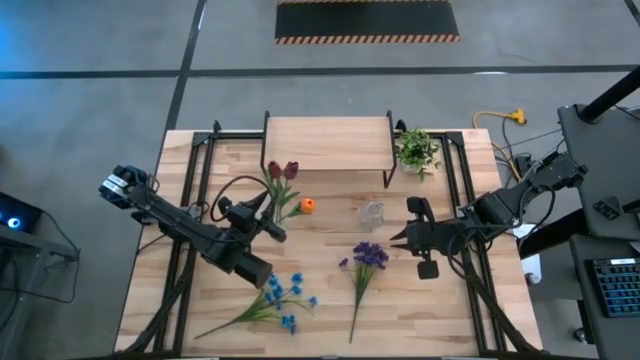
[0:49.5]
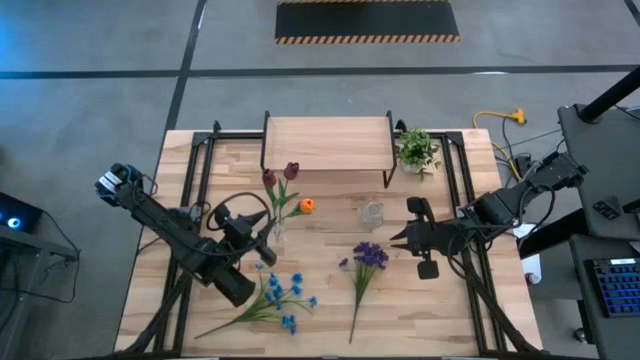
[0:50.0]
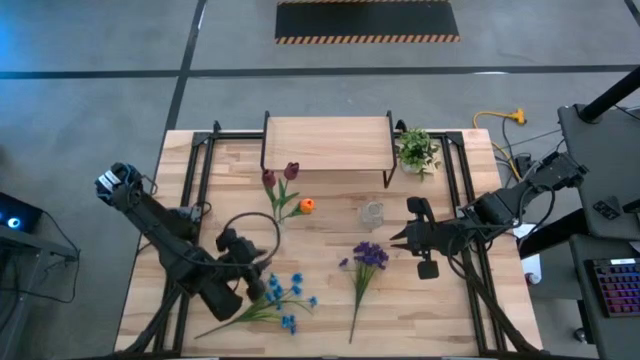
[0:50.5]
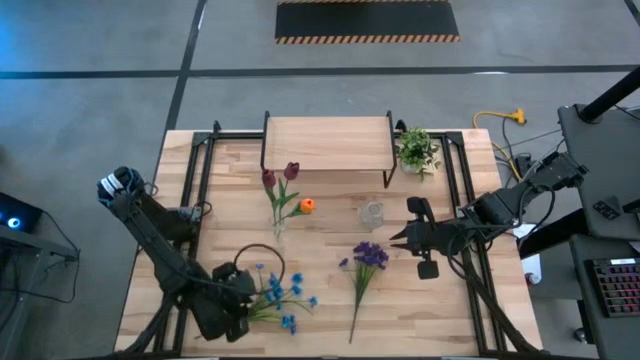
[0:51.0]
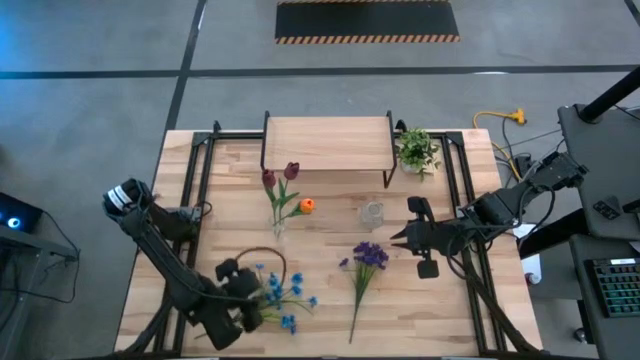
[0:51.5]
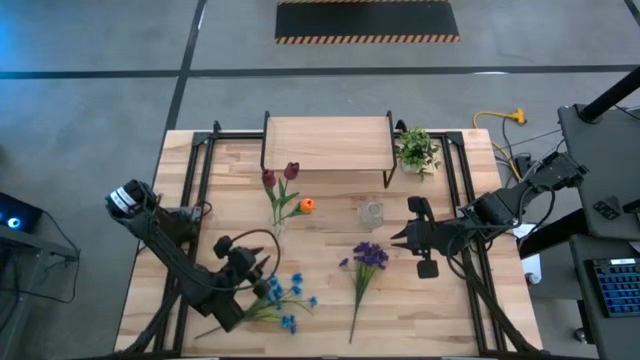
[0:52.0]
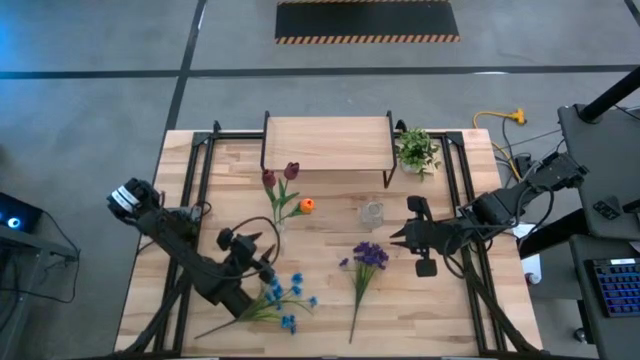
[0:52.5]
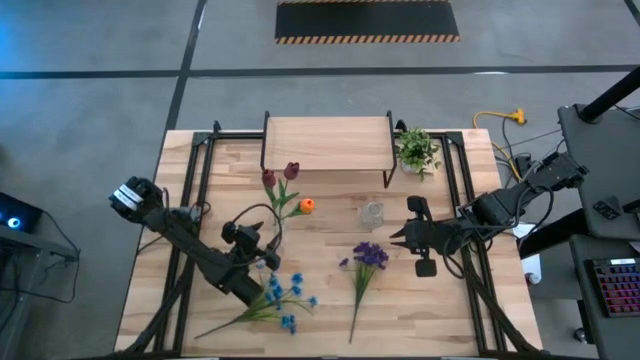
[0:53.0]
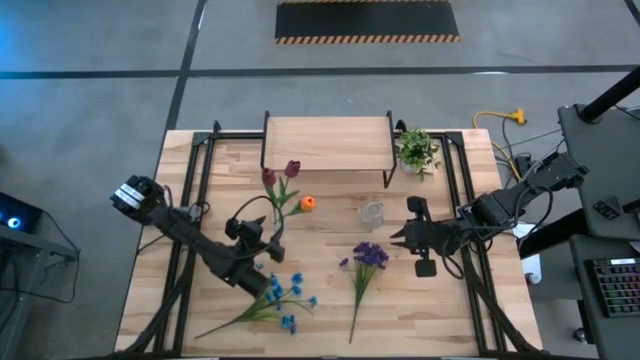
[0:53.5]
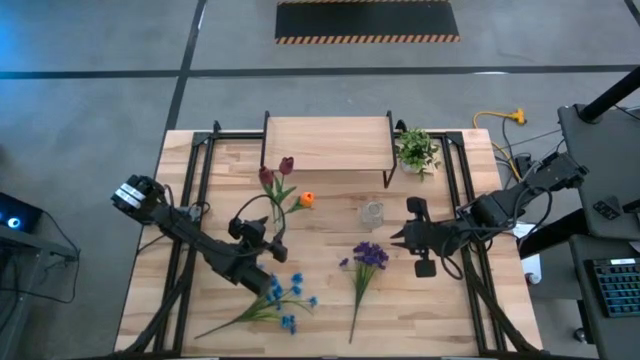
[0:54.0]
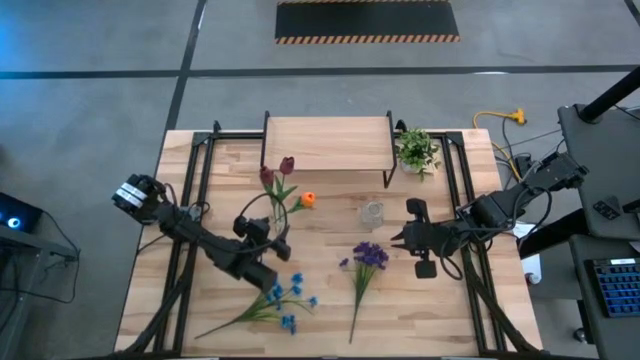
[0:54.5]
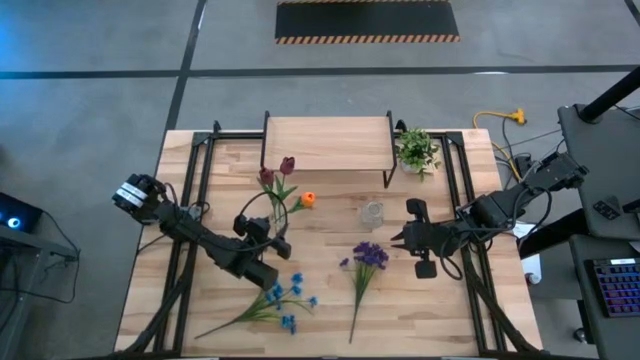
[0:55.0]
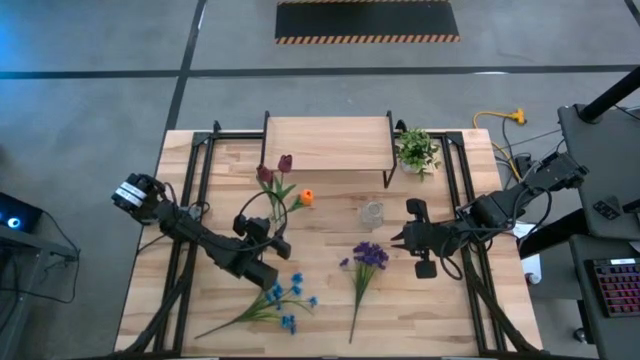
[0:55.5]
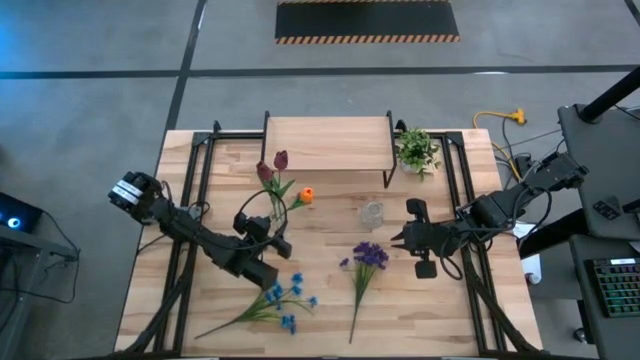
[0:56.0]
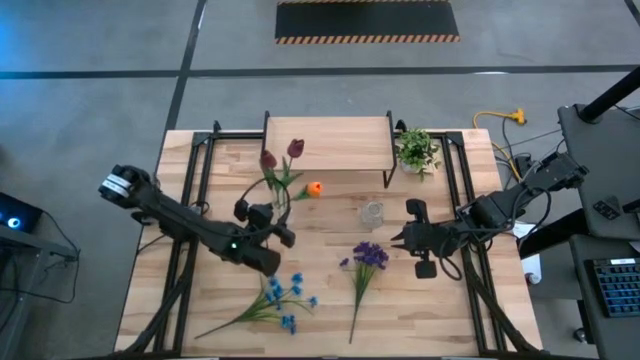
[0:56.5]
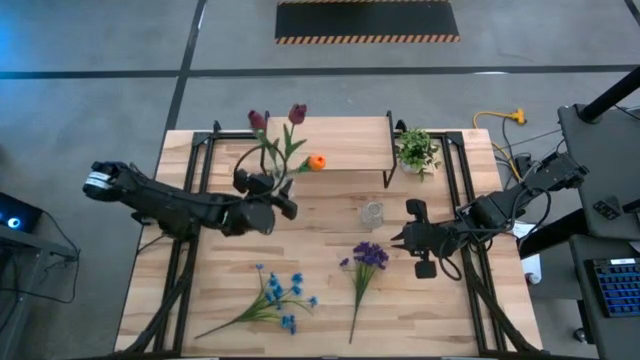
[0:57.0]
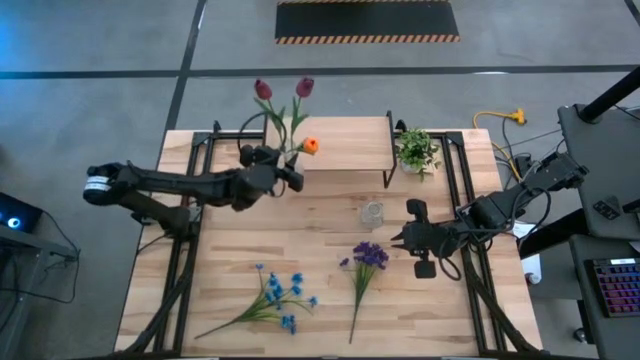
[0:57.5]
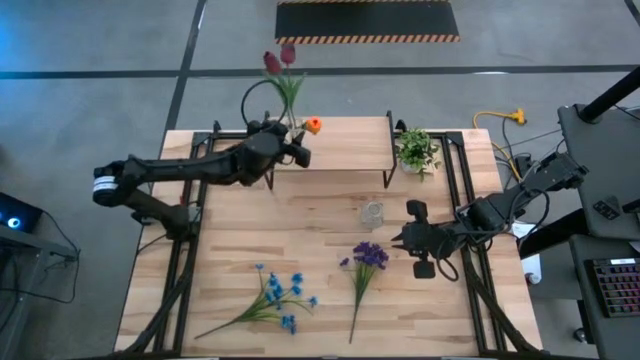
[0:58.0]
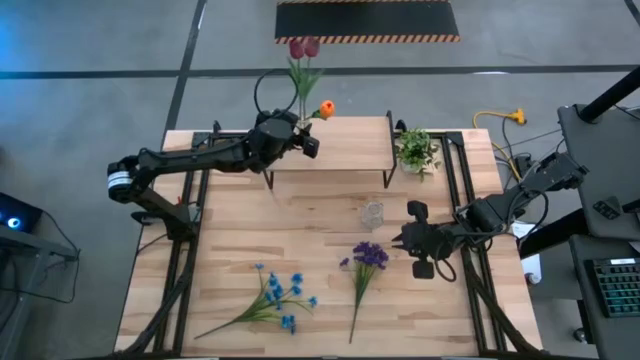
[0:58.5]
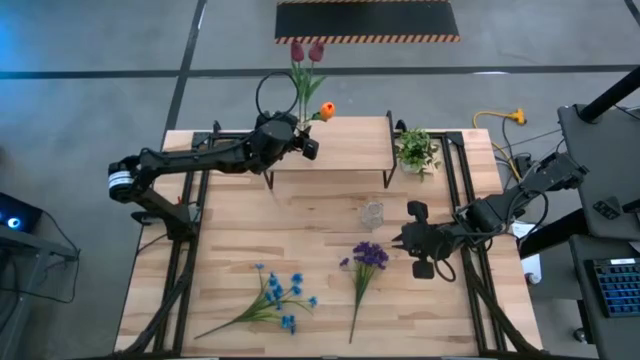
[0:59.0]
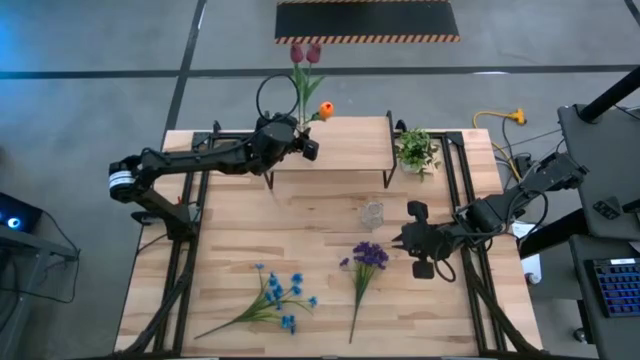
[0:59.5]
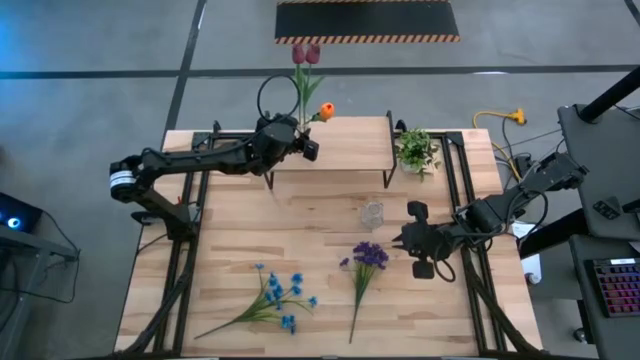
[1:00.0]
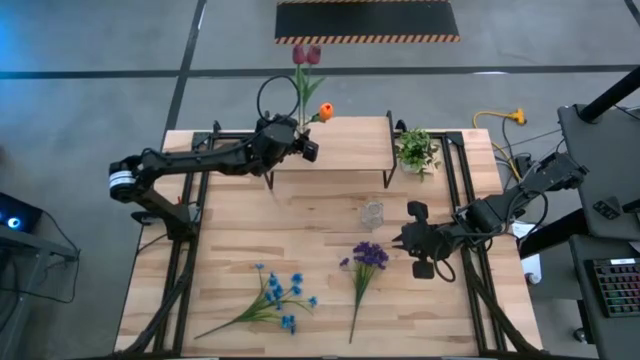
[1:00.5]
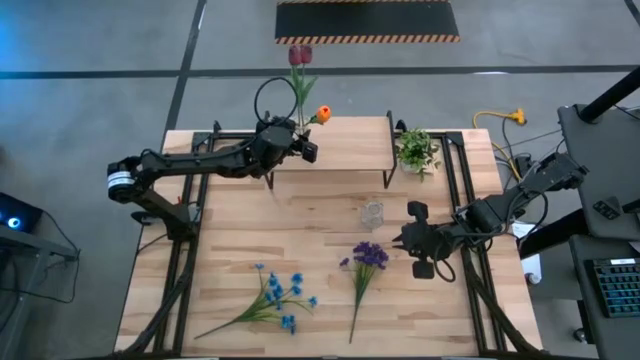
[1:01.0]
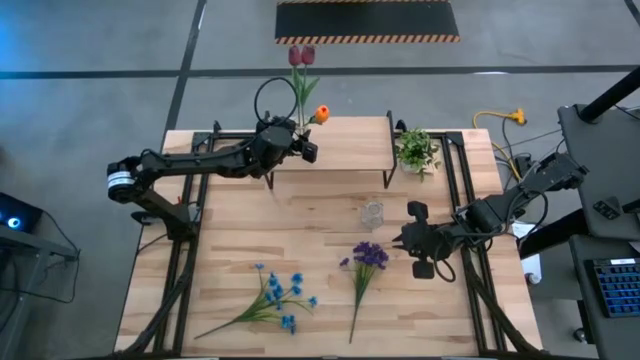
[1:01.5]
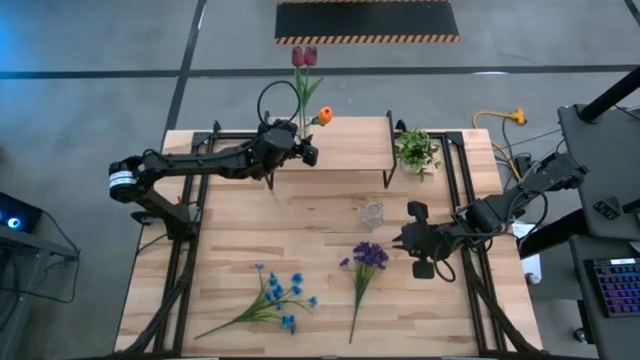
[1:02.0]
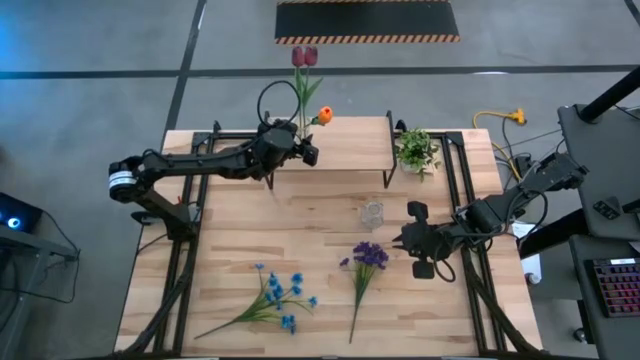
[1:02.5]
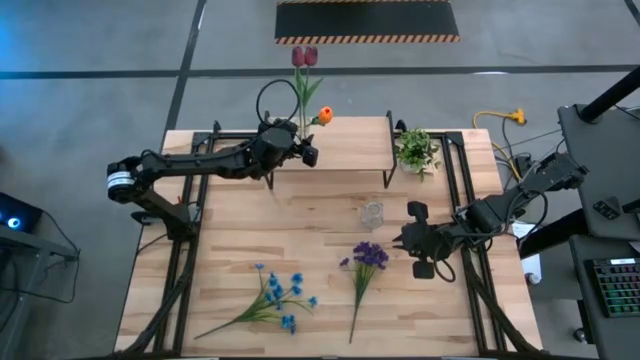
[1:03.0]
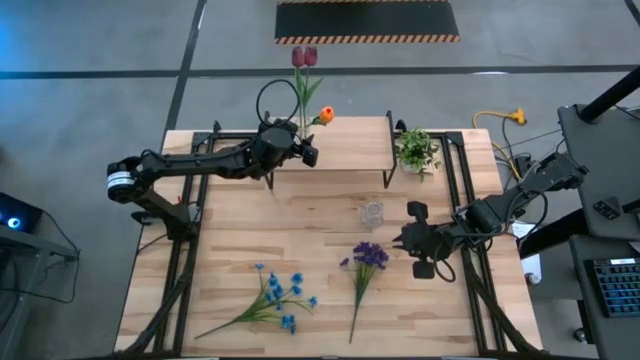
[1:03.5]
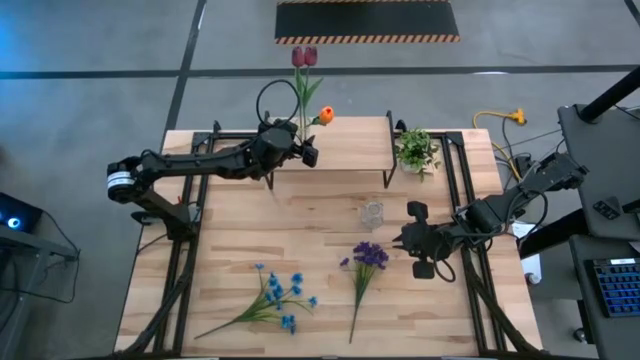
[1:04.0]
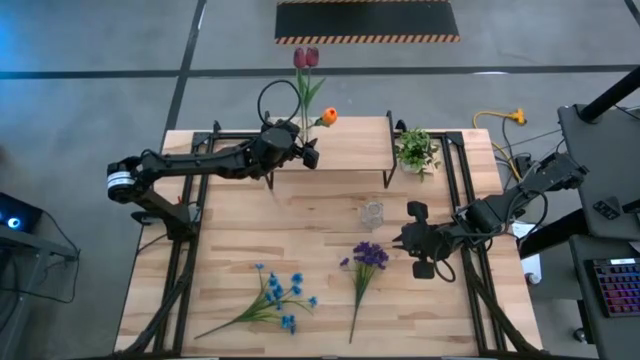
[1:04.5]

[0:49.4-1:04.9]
Task: Pick and place flowers into a vace then onto a shelf
Put the left transparent vase with the tulips on the shelf

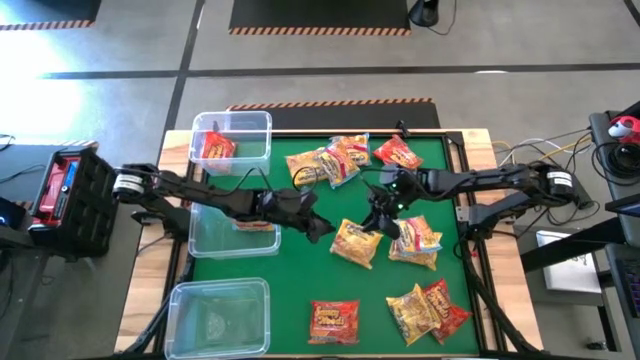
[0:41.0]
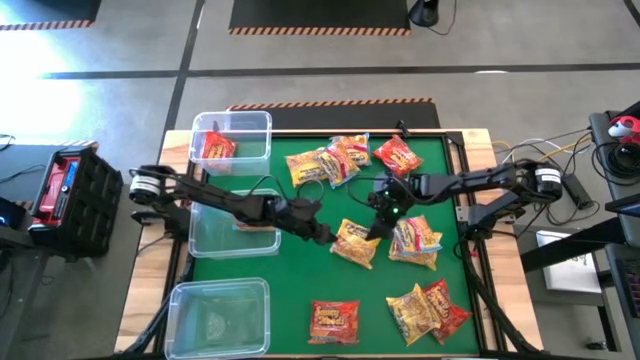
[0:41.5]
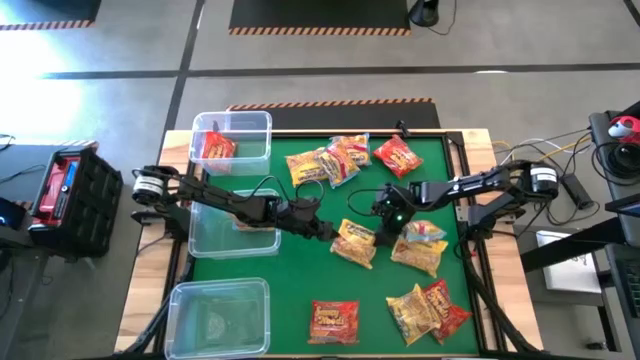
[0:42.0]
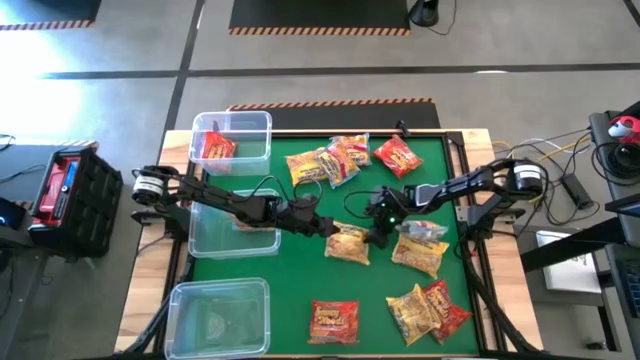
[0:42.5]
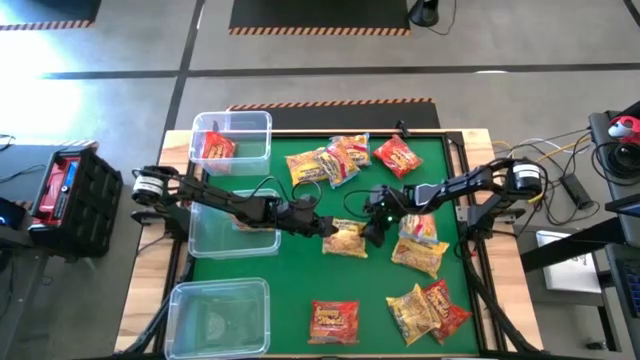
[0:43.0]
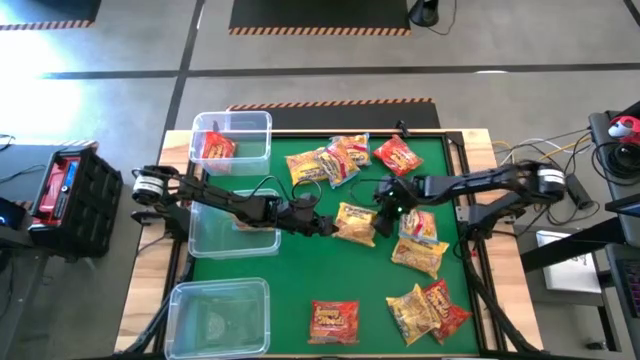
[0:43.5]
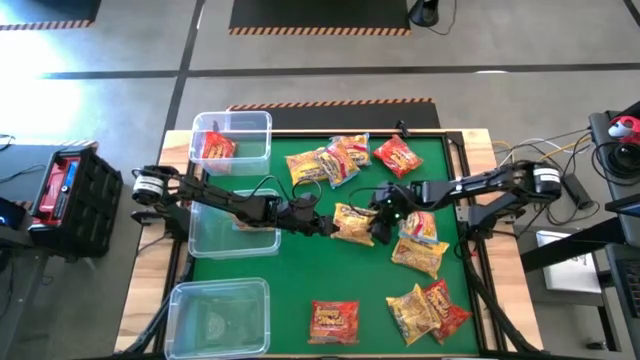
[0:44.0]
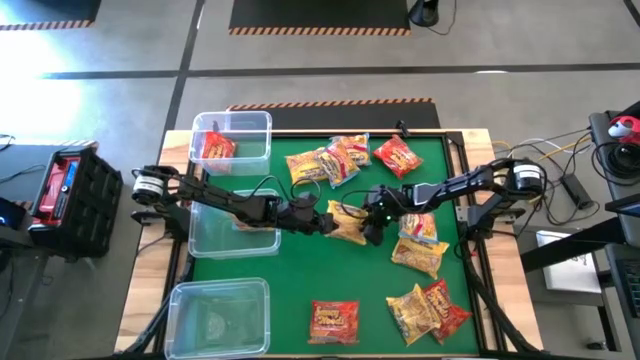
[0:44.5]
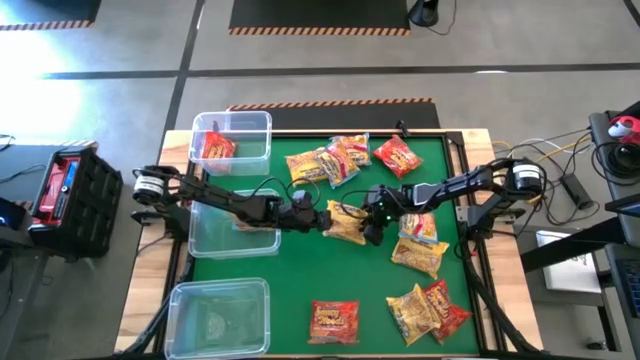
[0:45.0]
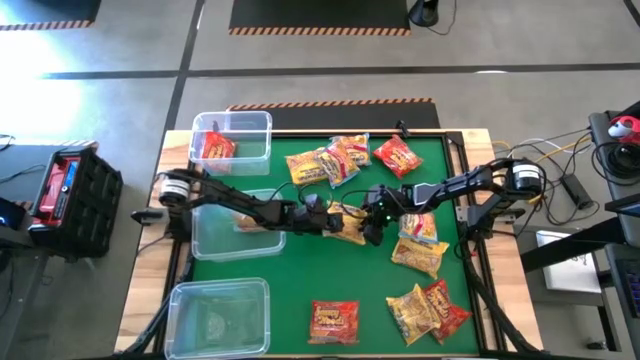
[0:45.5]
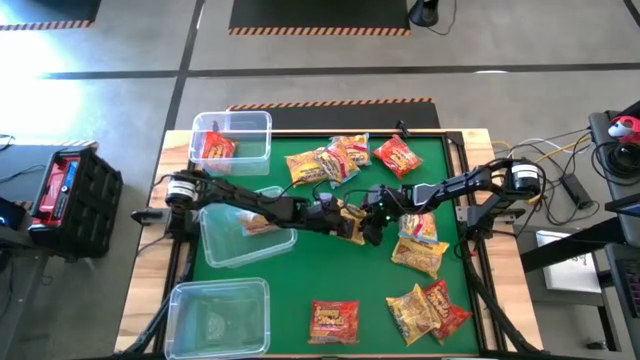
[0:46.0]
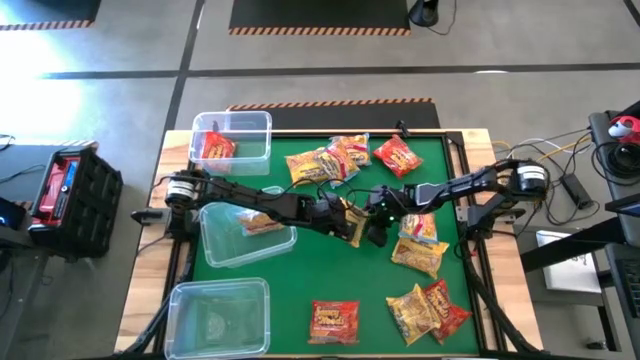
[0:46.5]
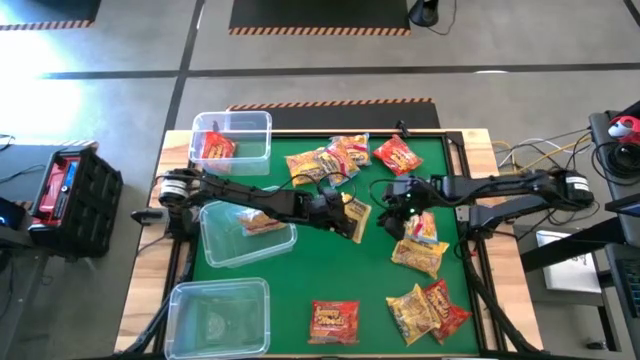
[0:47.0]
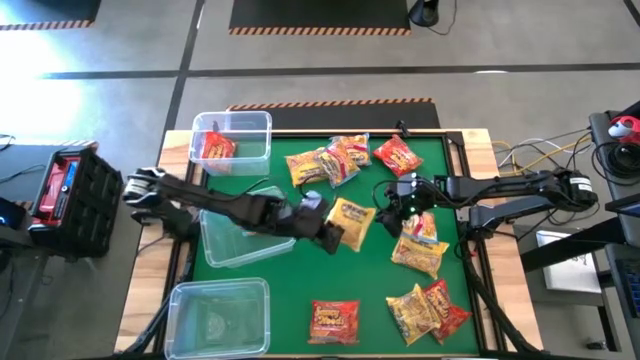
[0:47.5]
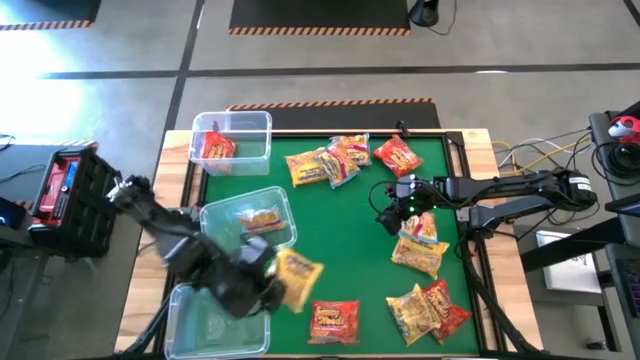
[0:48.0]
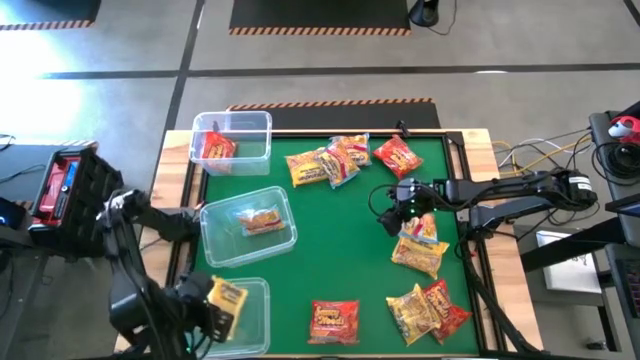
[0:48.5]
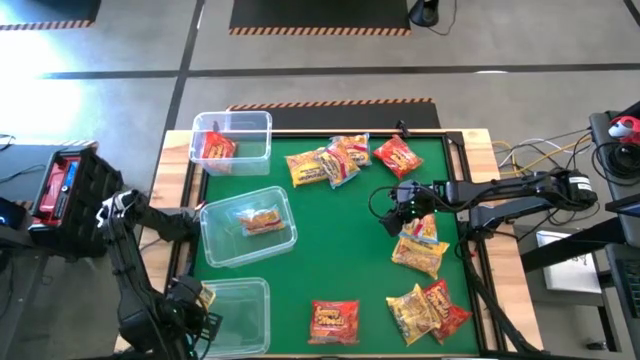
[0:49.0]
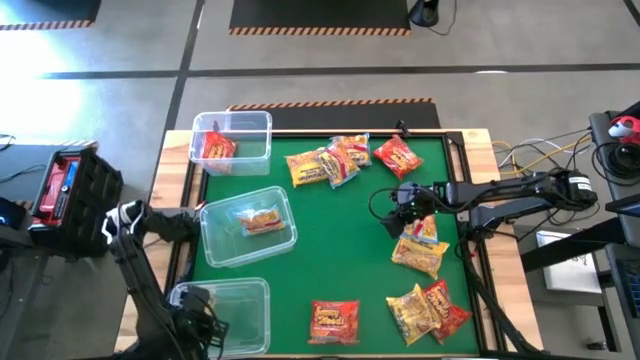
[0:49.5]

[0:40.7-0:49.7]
Task: Sort Maruchan noodles
Put the middle yellow noodle pack into the bottom transparent bin
